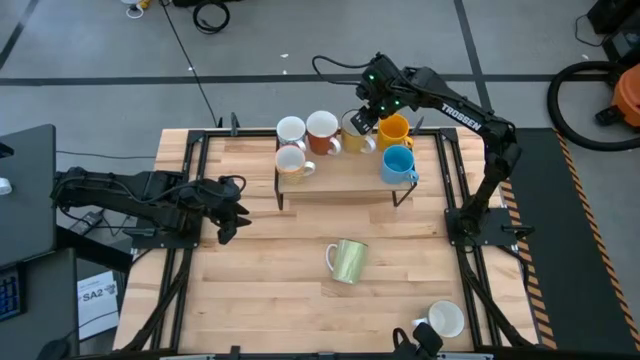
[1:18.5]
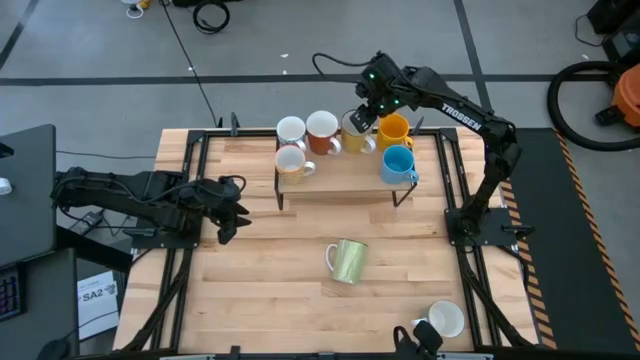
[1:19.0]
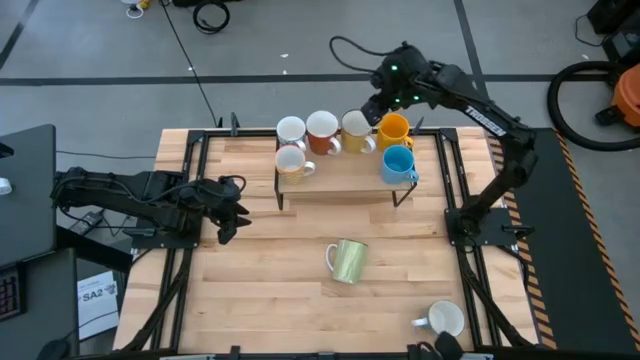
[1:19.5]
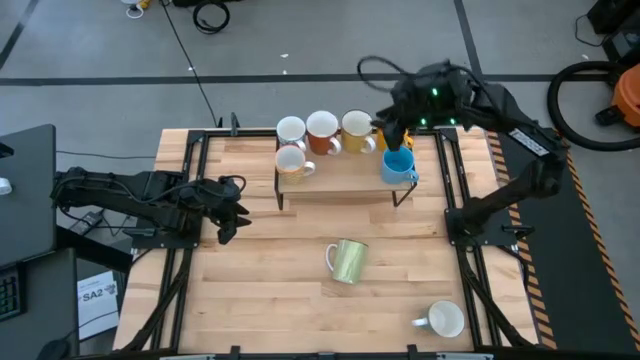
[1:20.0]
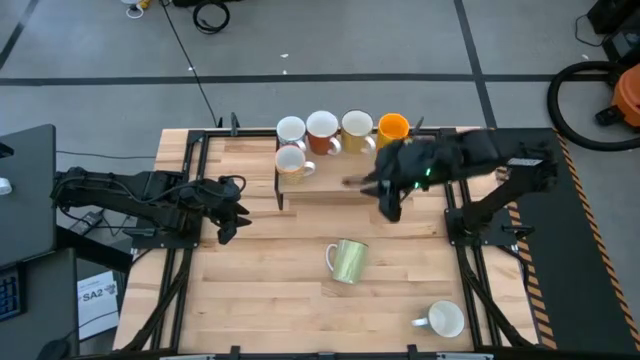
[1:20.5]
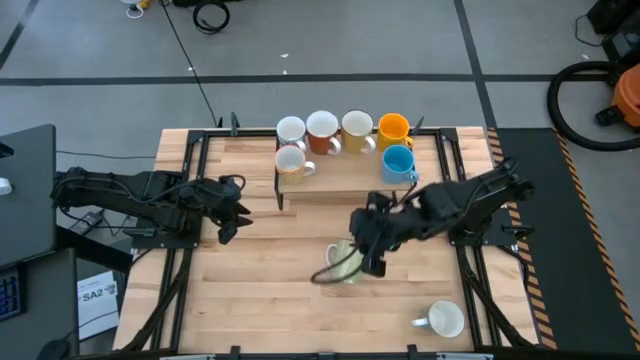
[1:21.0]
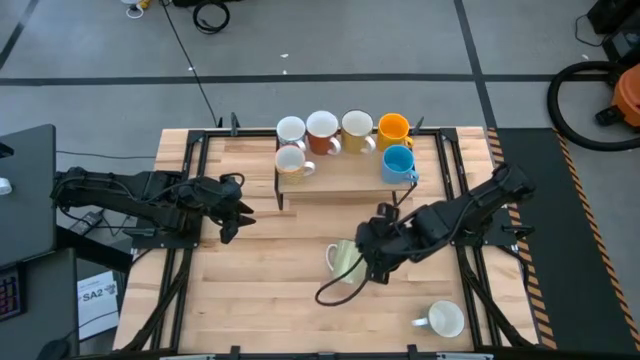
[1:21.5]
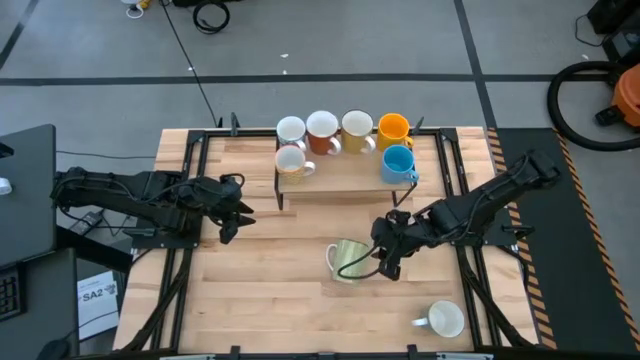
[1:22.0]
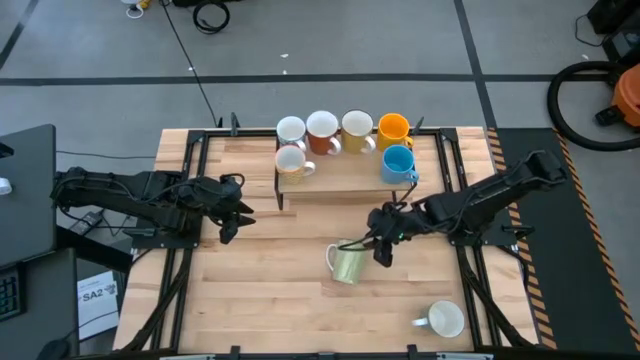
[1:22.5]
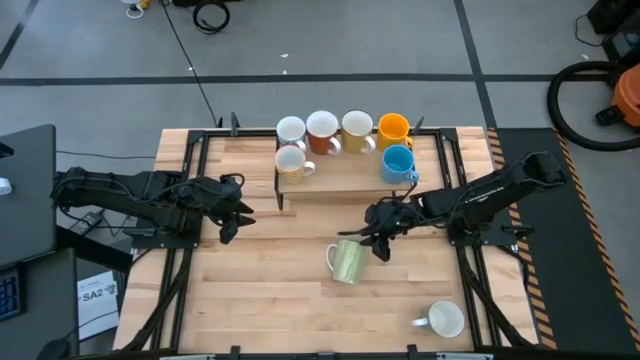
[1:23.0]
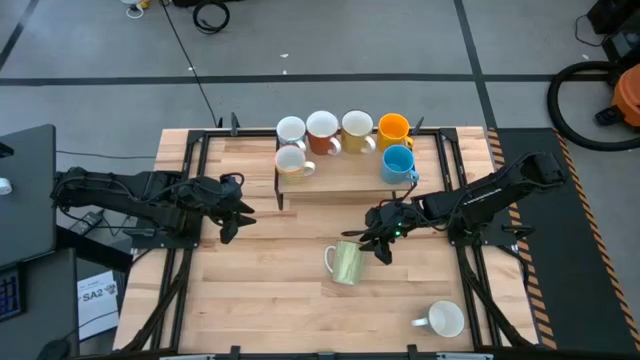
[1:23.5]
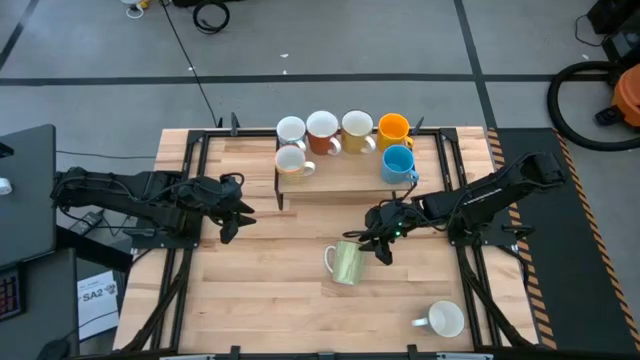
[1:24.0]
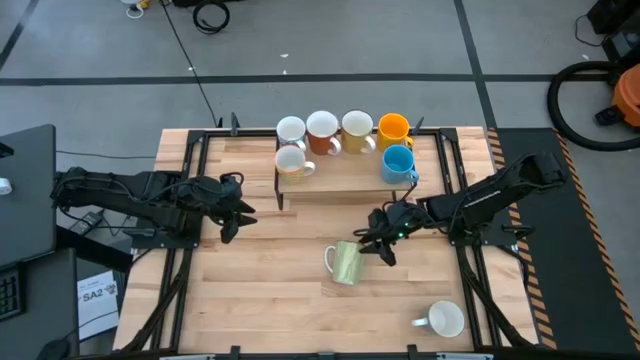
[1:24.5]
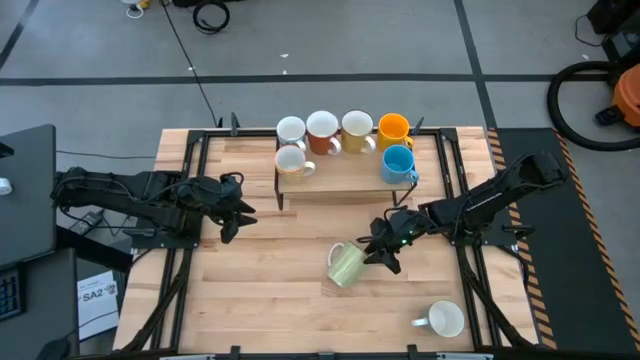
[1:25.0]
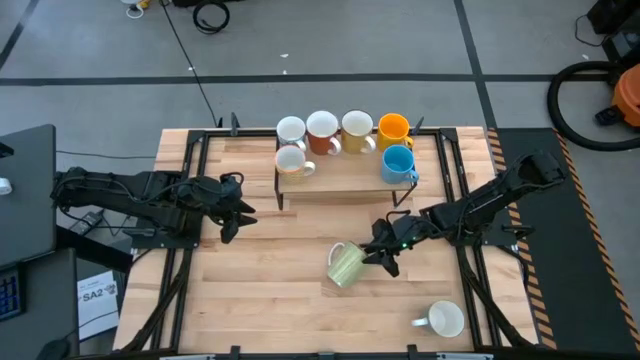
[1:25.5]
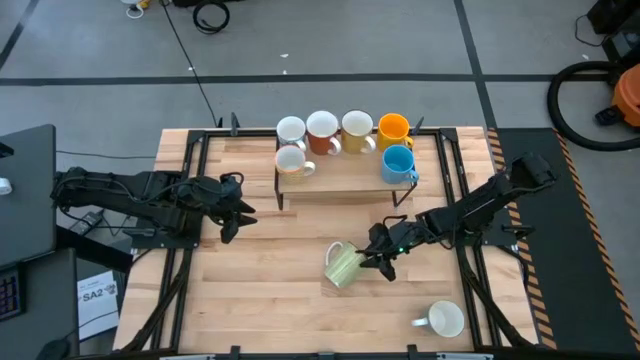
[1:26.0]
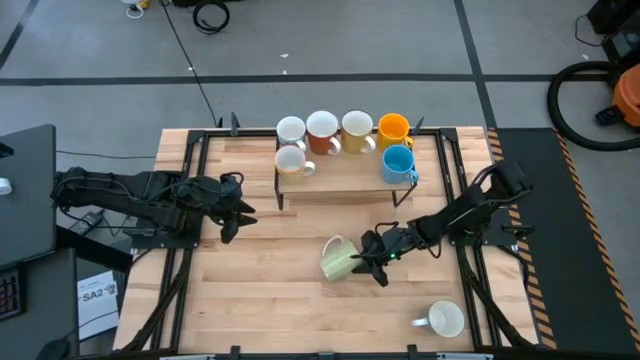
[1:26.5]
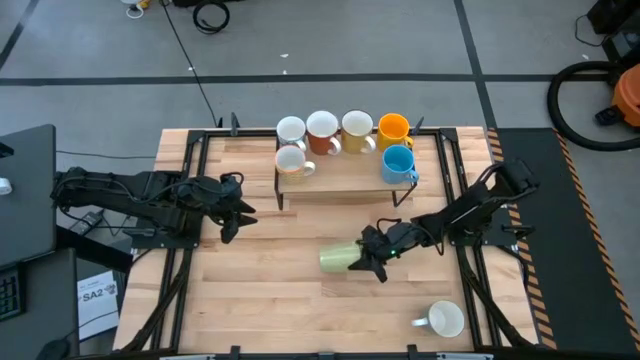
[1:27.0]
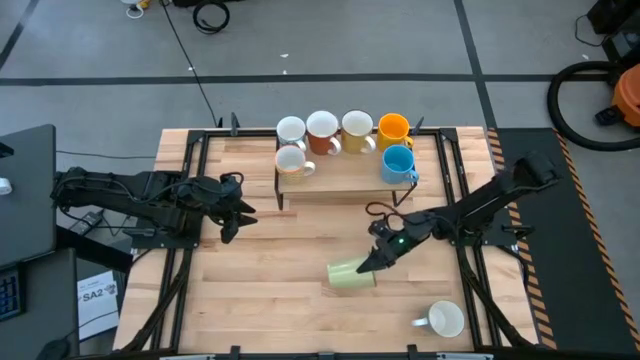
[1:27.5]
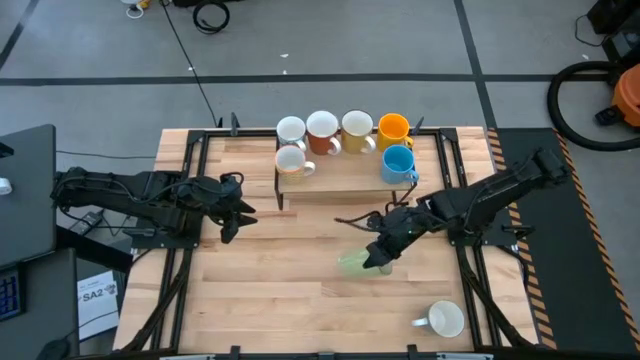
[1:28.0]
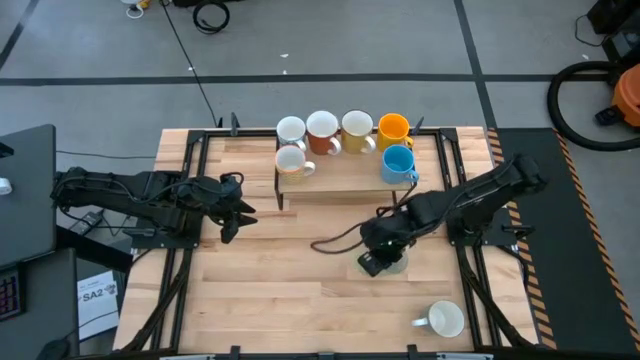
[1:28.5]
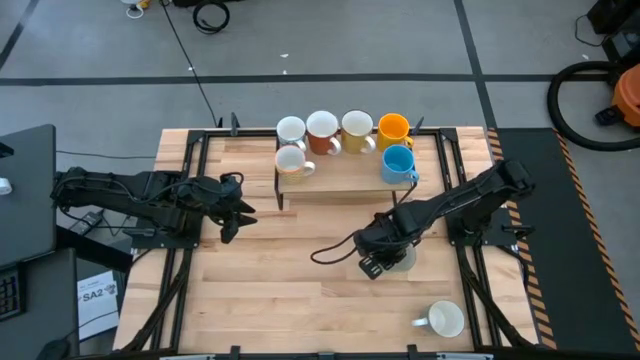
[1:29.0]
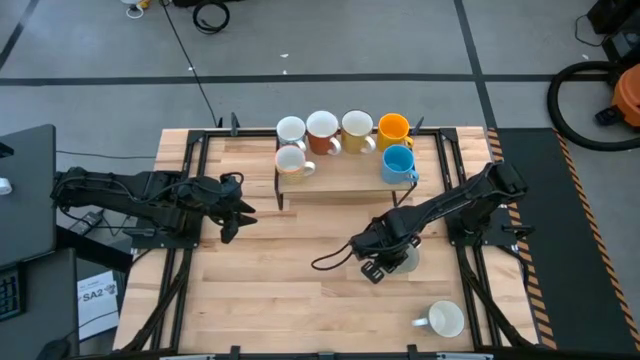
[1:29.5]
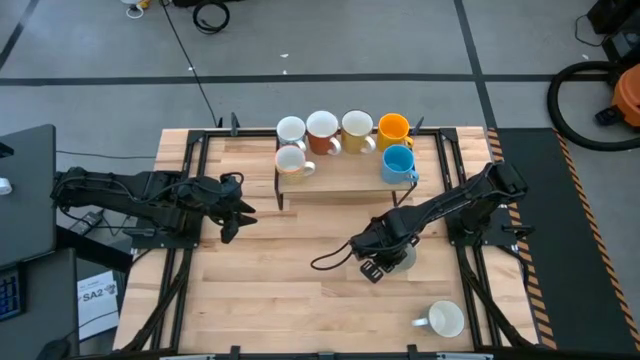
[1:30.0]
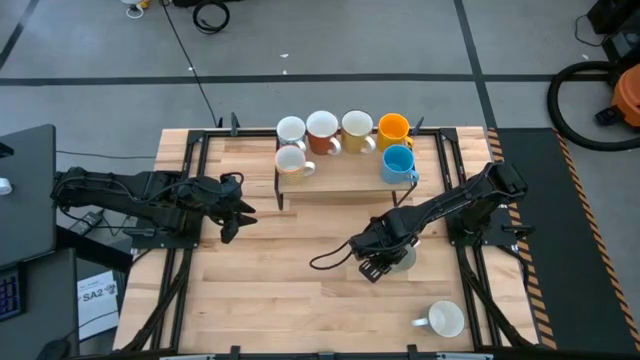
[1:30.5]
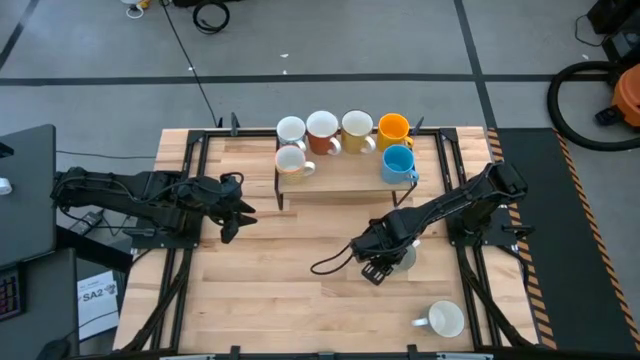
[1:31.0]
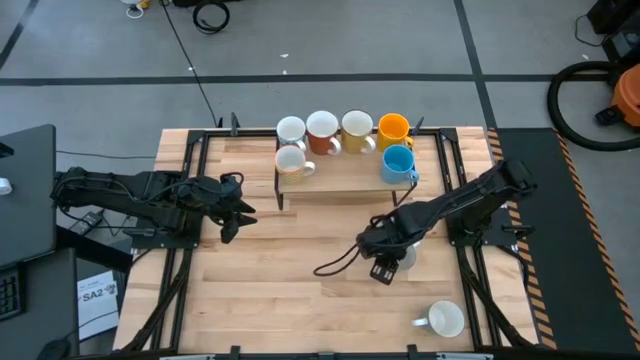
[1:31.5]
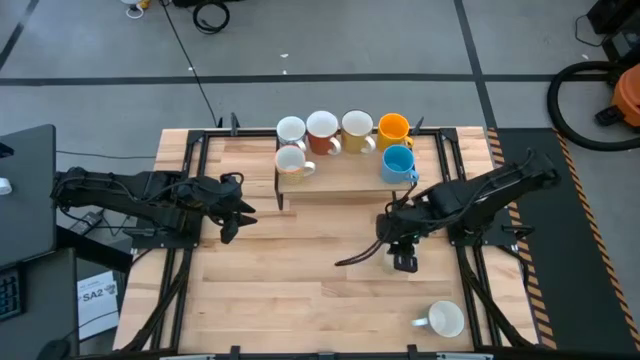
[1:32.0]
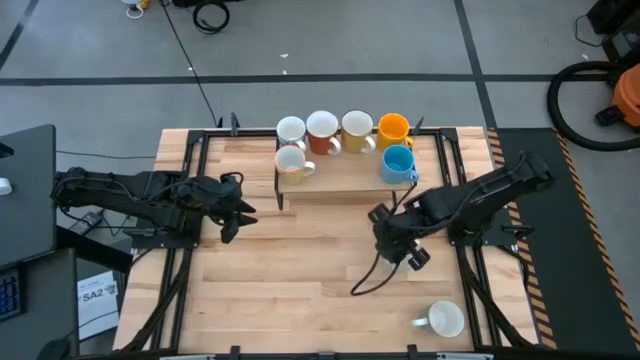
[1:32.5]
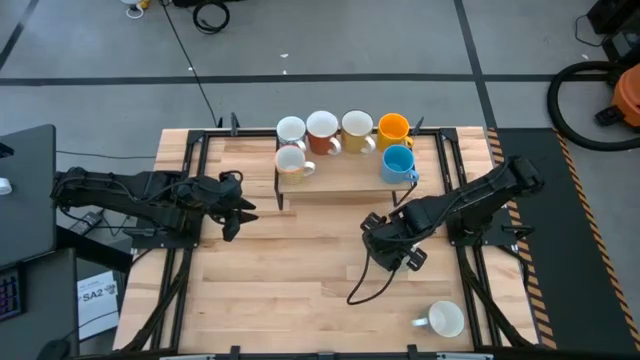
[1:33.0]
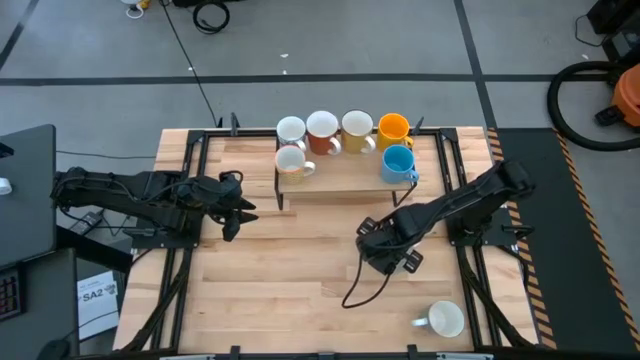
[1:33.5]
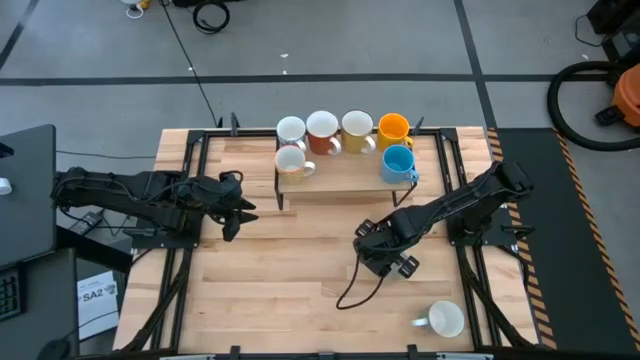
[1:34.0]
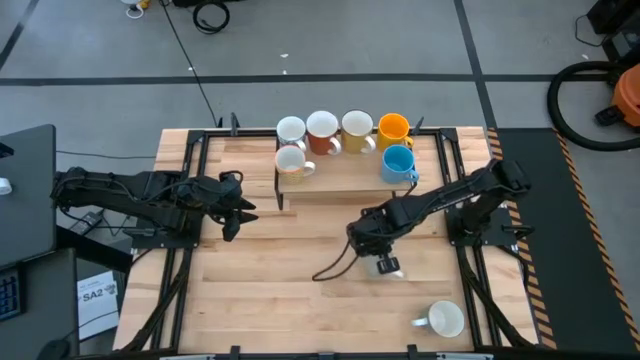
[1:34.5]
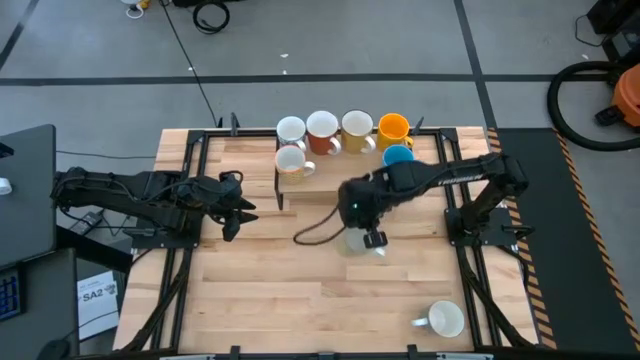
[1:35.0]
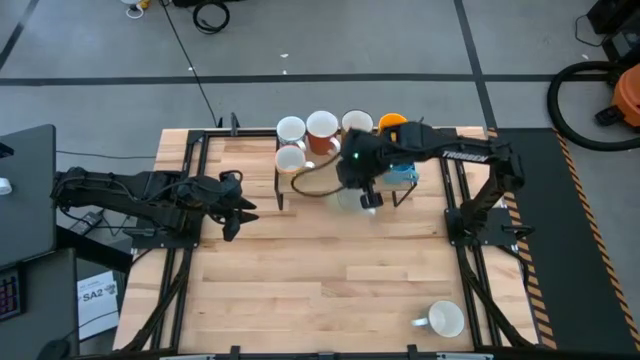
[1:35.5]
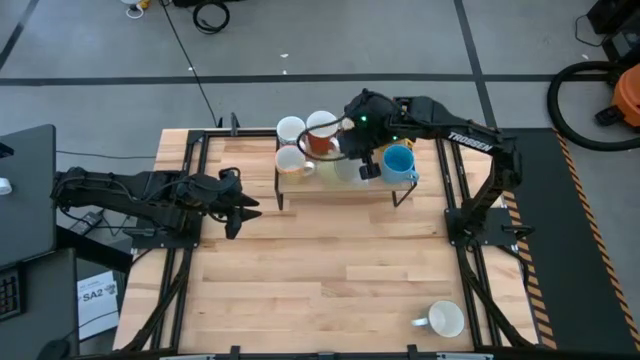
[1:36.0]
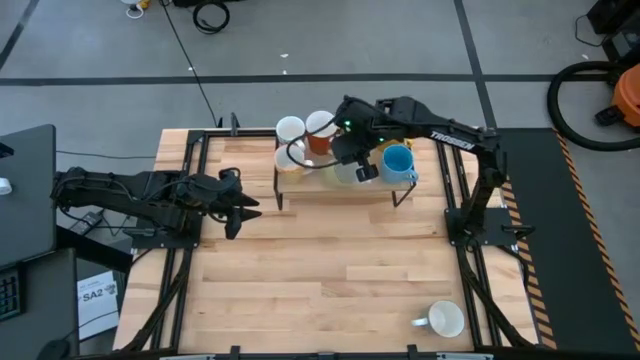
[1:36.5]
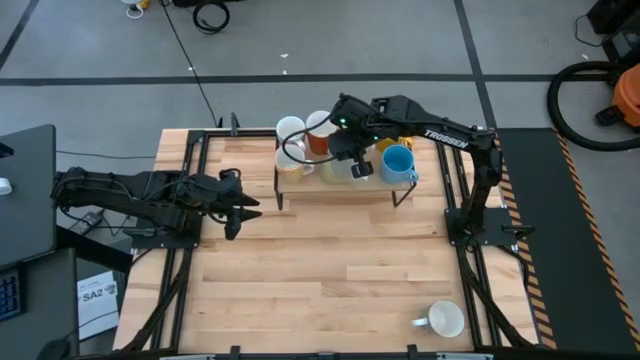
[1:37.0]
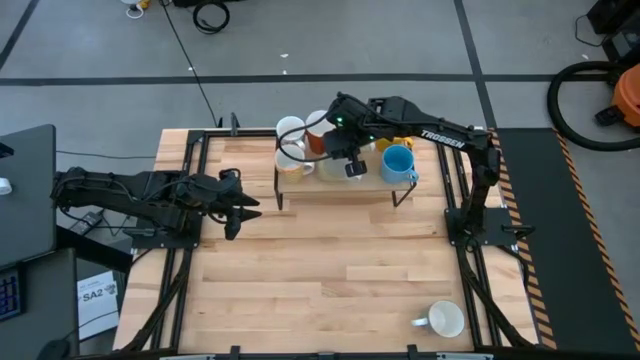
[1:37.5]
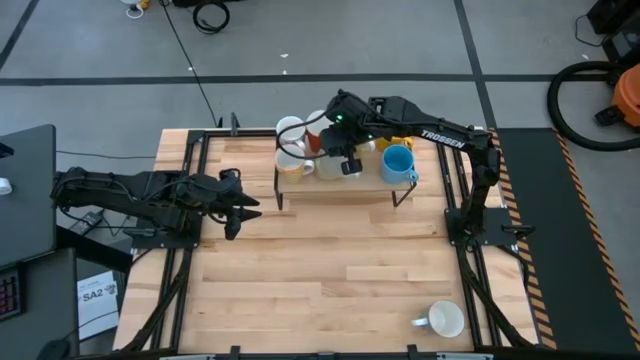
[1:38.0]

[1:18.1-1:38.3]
Task: Place coffee mugs
Put the green mug on the shelf

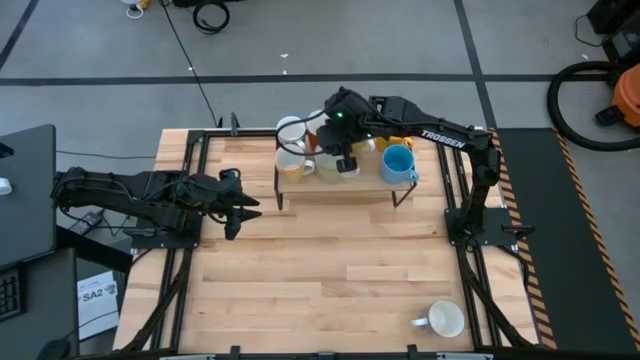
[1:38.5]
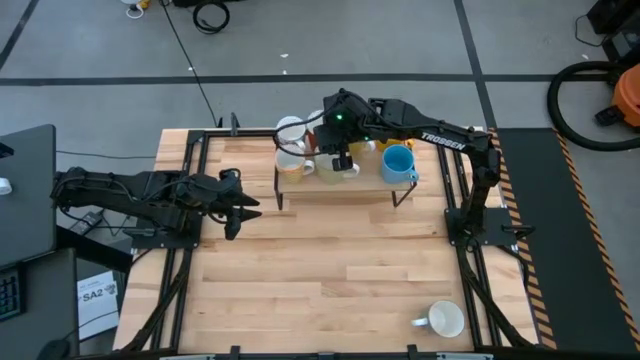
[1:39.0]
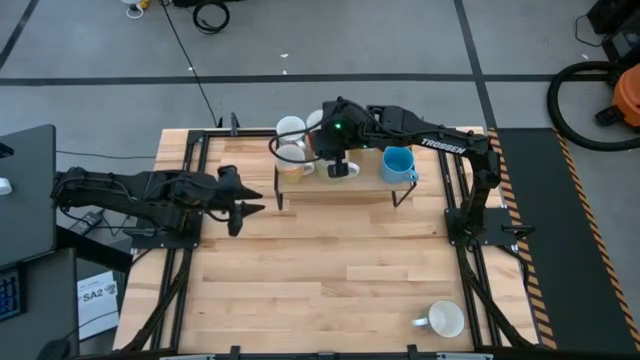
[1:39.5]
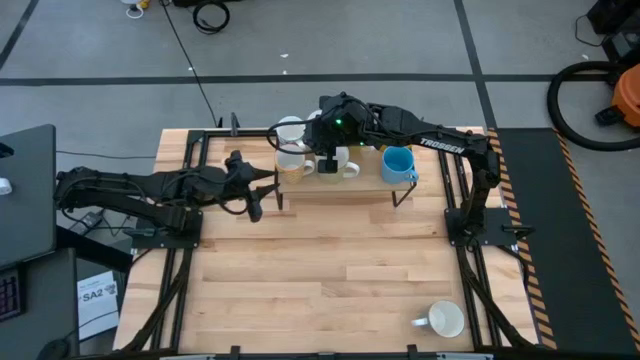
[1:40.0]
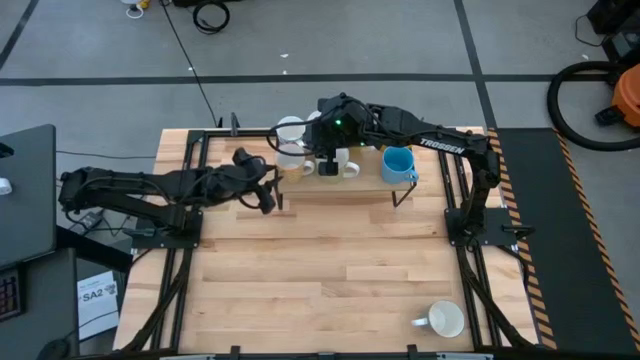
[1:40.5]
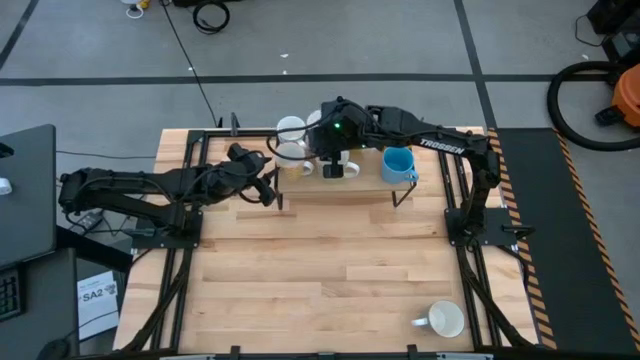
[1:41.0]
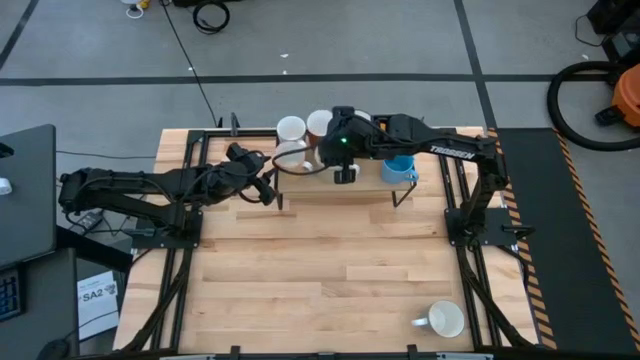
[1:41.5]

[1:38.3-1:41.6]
Adjust the yellow patterned mug on the shelf
